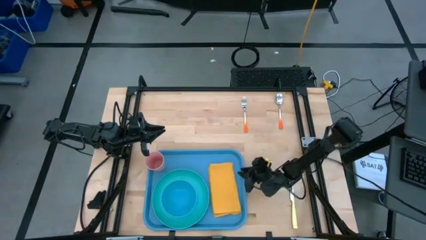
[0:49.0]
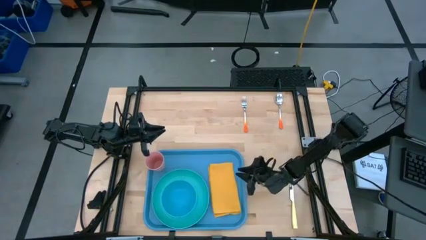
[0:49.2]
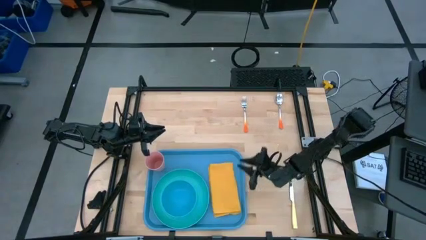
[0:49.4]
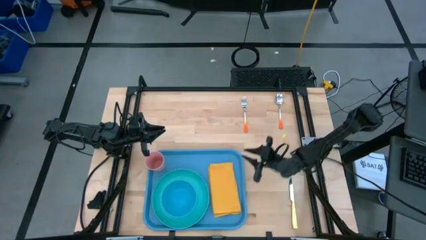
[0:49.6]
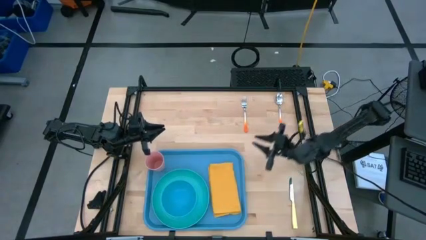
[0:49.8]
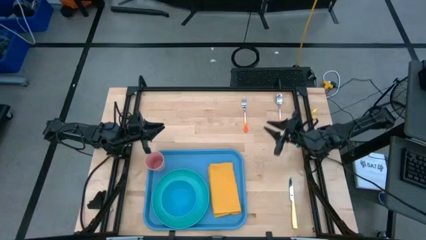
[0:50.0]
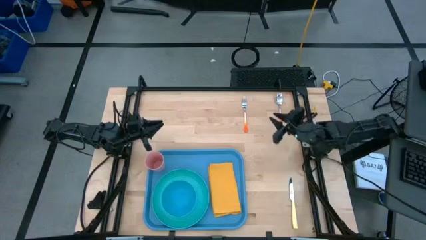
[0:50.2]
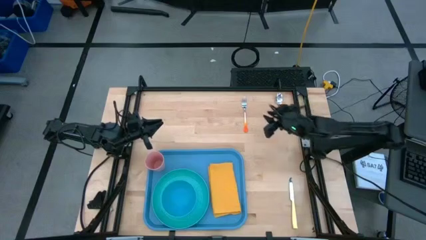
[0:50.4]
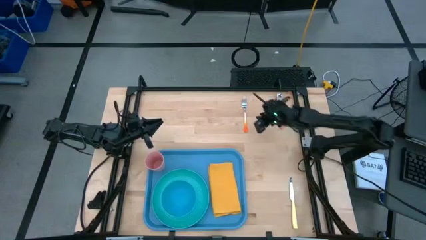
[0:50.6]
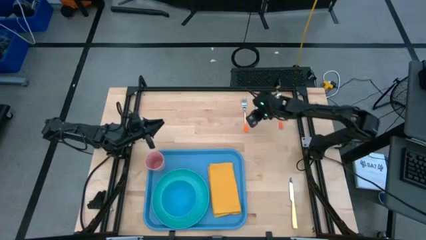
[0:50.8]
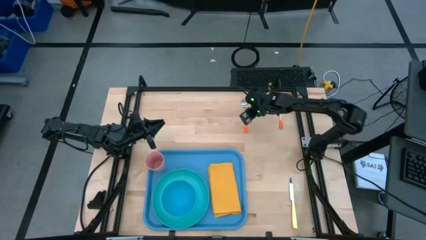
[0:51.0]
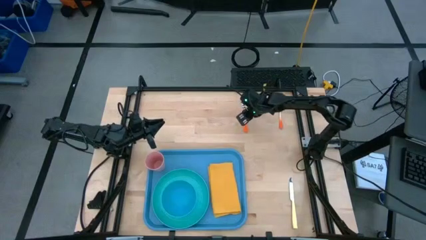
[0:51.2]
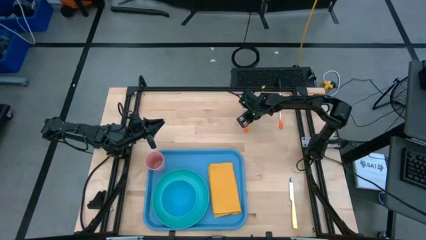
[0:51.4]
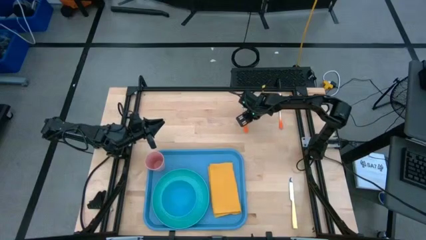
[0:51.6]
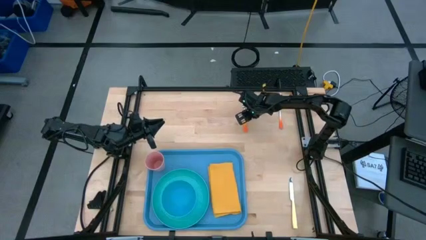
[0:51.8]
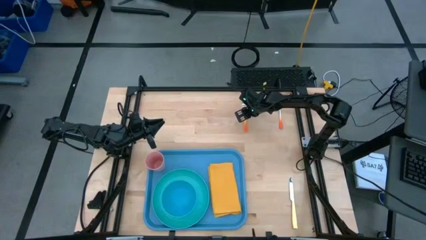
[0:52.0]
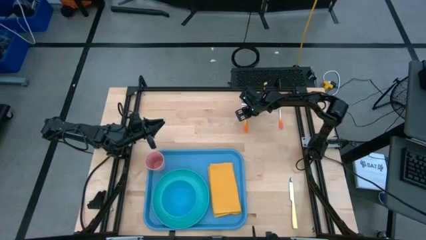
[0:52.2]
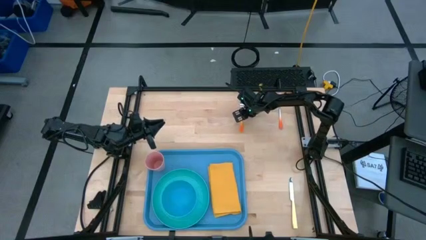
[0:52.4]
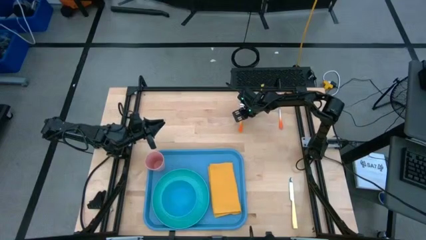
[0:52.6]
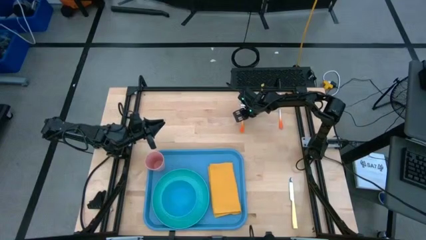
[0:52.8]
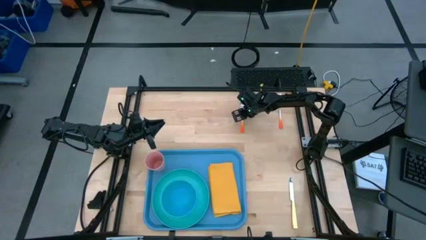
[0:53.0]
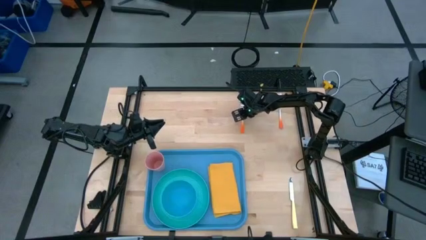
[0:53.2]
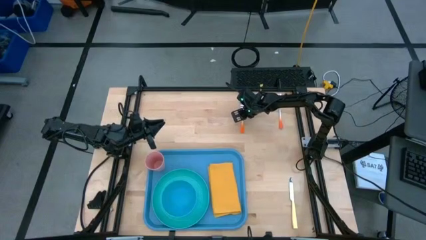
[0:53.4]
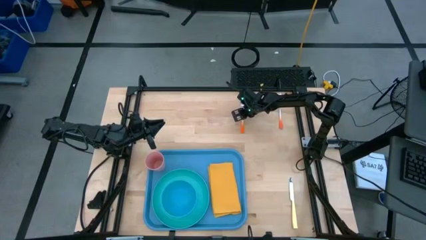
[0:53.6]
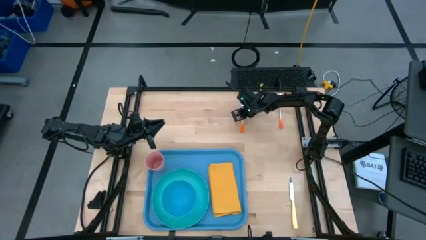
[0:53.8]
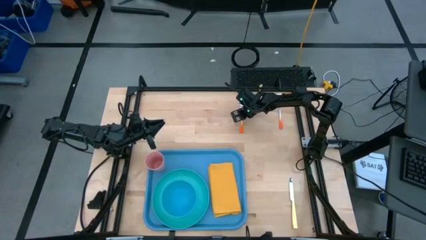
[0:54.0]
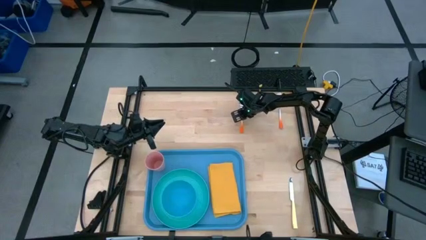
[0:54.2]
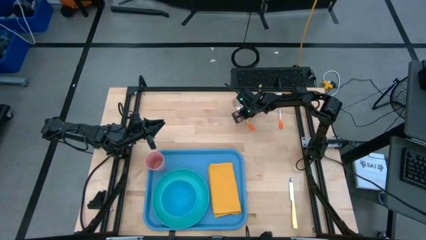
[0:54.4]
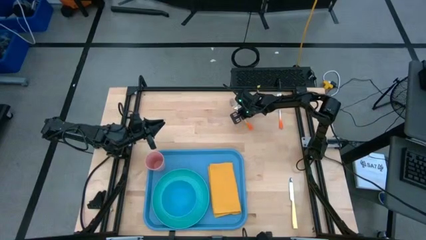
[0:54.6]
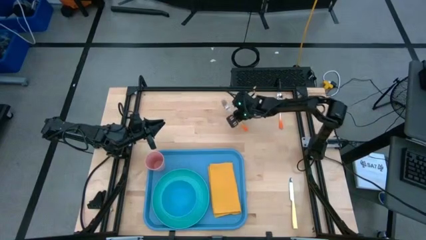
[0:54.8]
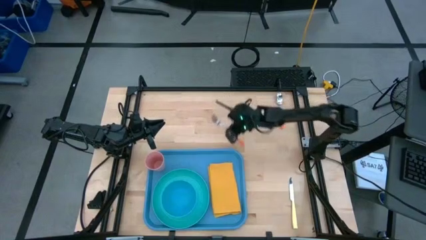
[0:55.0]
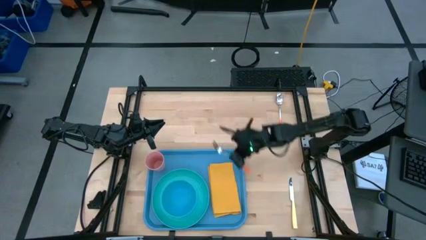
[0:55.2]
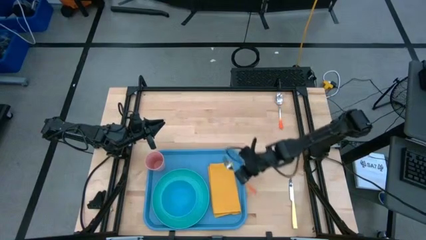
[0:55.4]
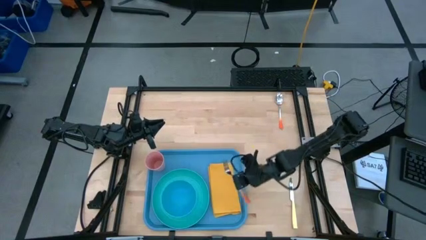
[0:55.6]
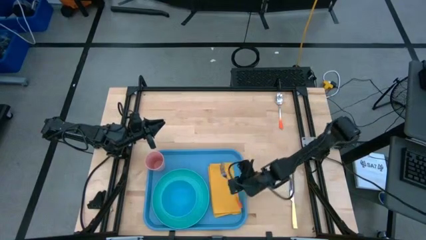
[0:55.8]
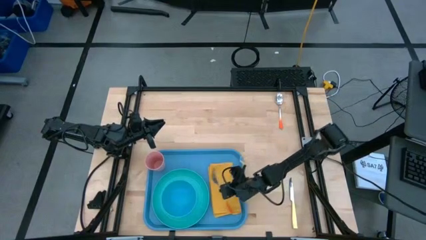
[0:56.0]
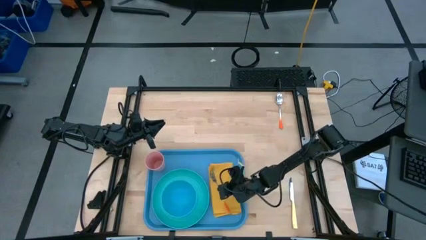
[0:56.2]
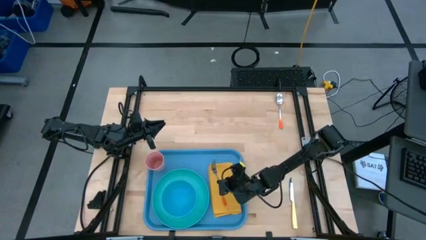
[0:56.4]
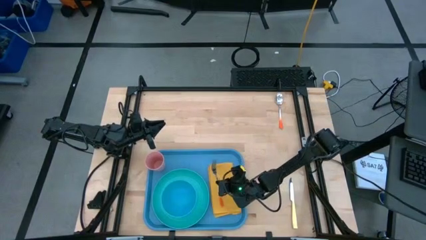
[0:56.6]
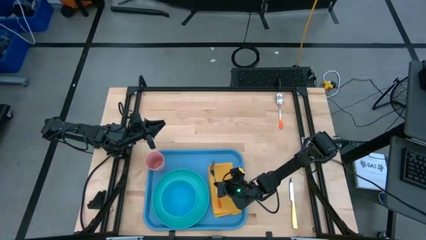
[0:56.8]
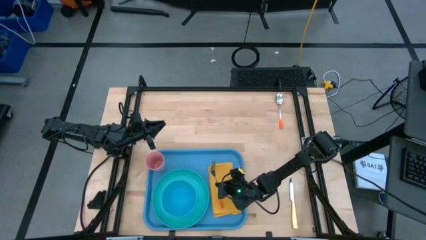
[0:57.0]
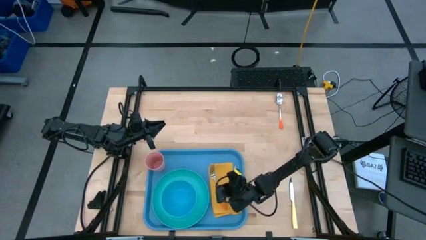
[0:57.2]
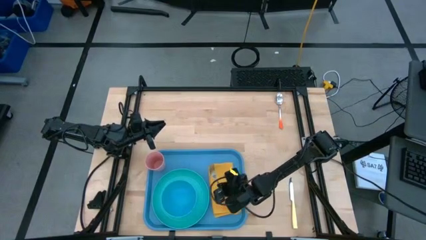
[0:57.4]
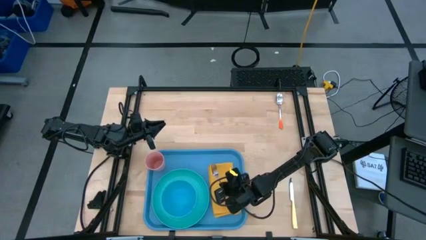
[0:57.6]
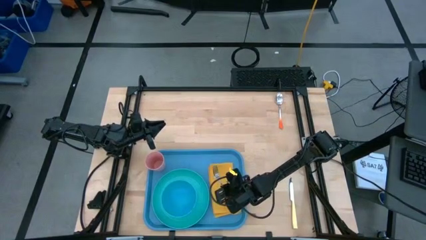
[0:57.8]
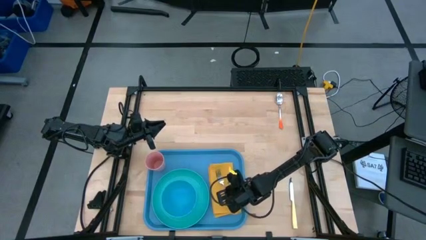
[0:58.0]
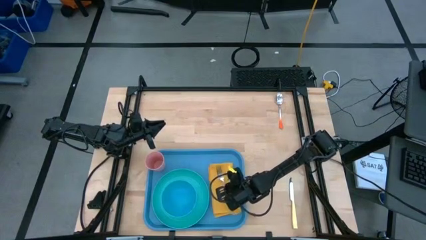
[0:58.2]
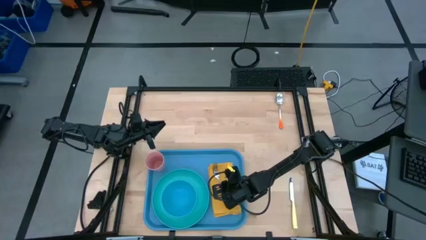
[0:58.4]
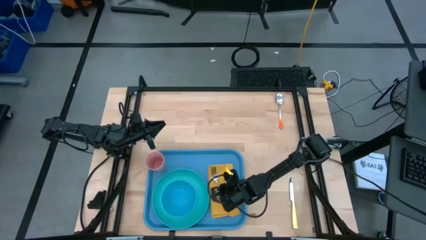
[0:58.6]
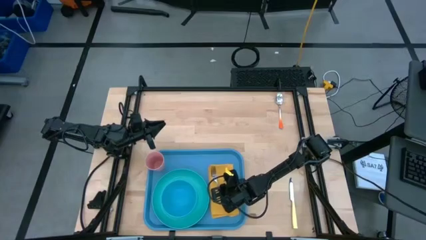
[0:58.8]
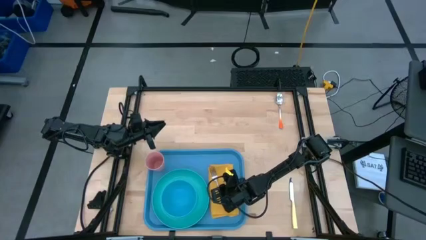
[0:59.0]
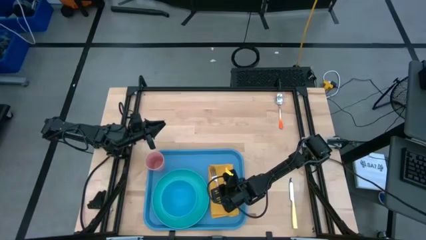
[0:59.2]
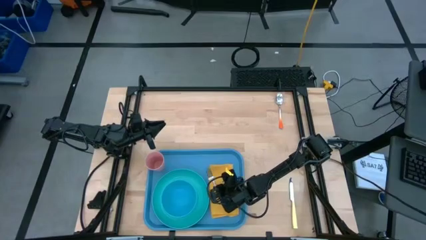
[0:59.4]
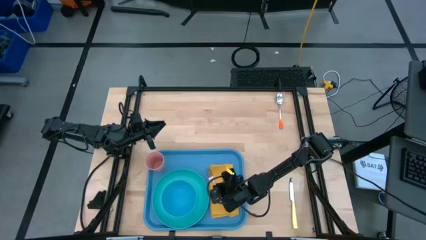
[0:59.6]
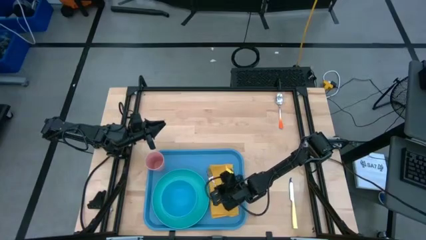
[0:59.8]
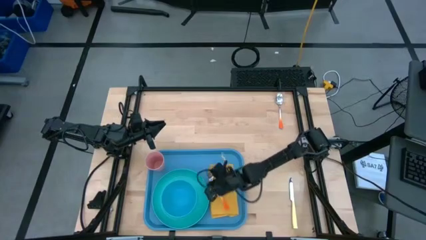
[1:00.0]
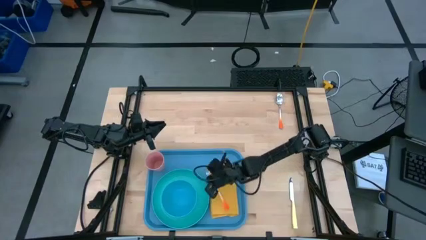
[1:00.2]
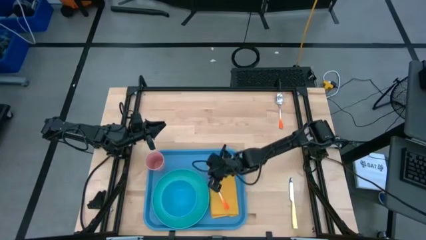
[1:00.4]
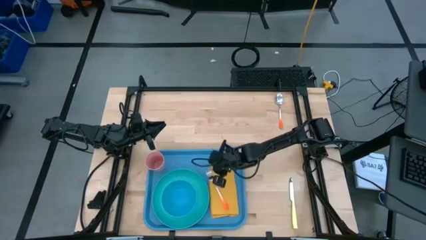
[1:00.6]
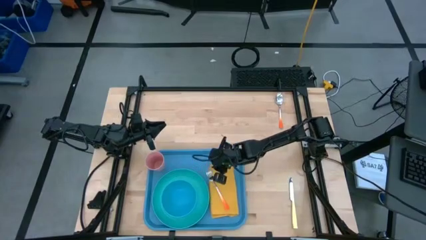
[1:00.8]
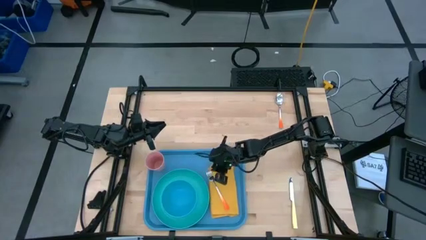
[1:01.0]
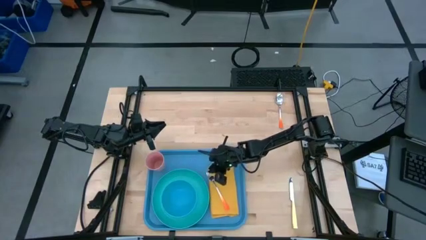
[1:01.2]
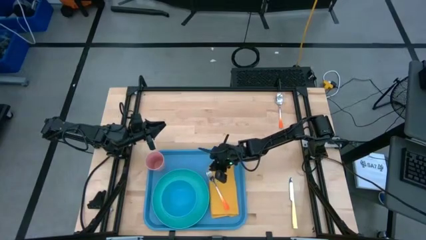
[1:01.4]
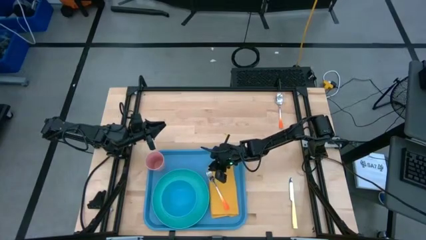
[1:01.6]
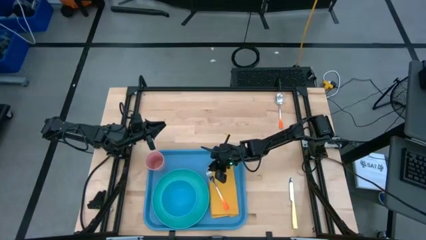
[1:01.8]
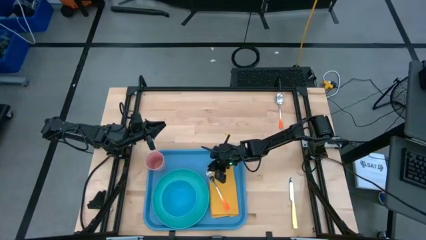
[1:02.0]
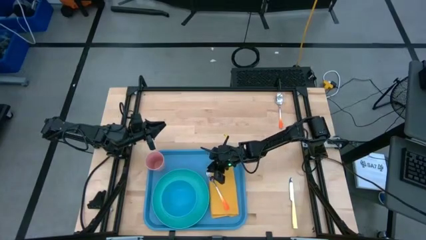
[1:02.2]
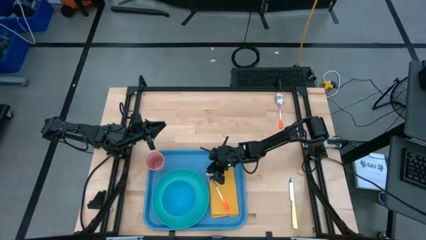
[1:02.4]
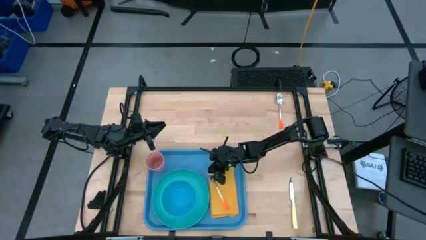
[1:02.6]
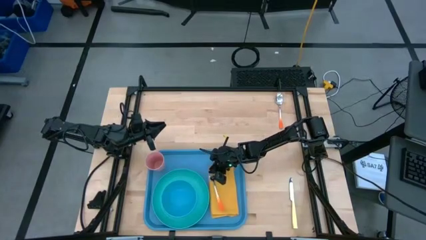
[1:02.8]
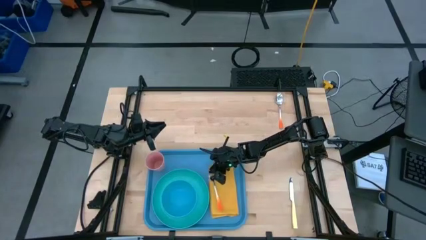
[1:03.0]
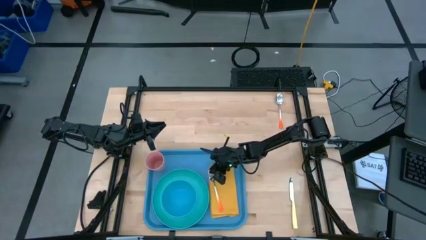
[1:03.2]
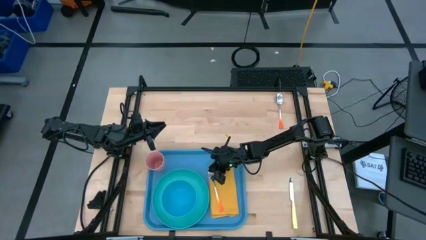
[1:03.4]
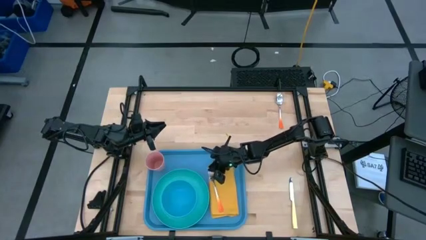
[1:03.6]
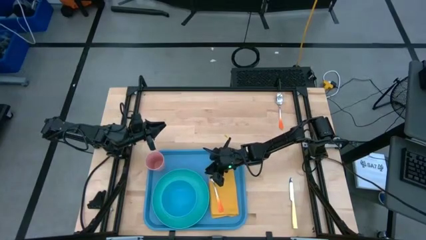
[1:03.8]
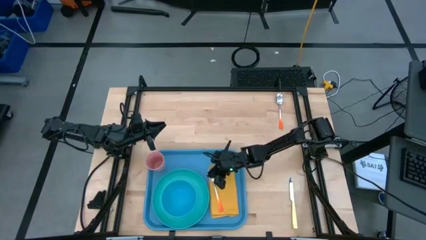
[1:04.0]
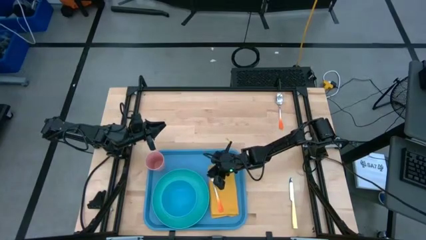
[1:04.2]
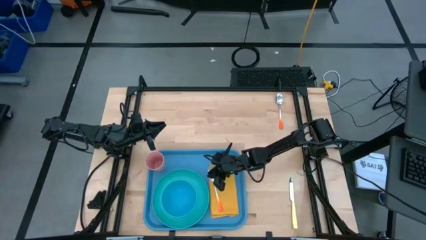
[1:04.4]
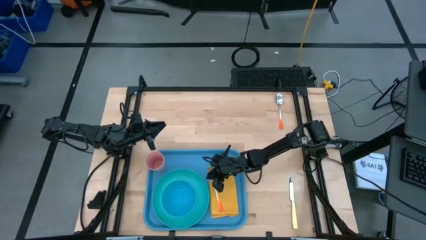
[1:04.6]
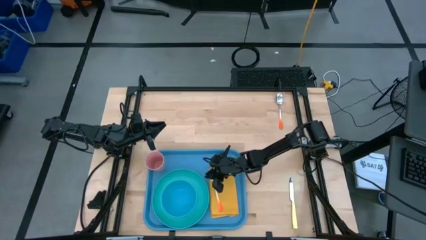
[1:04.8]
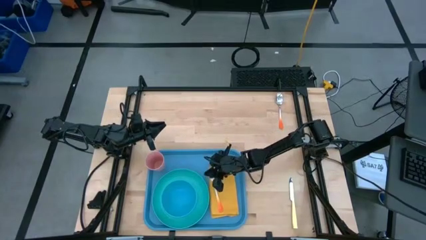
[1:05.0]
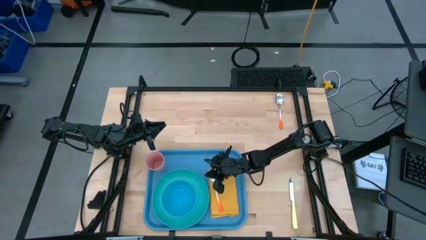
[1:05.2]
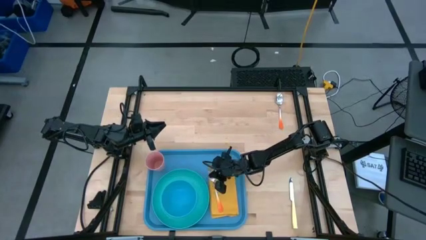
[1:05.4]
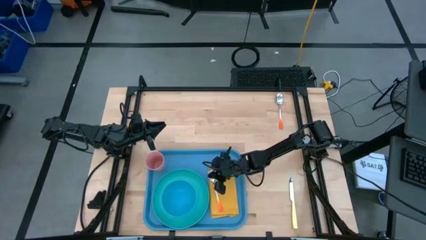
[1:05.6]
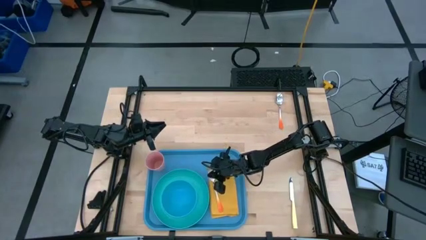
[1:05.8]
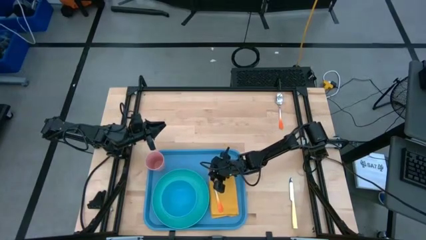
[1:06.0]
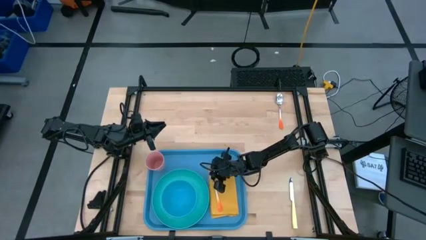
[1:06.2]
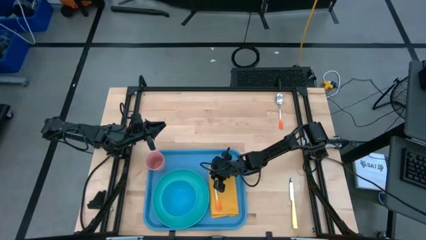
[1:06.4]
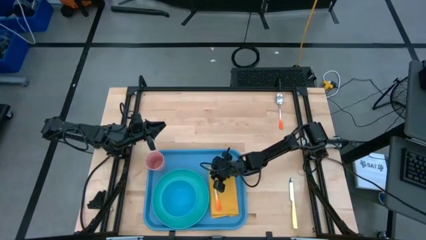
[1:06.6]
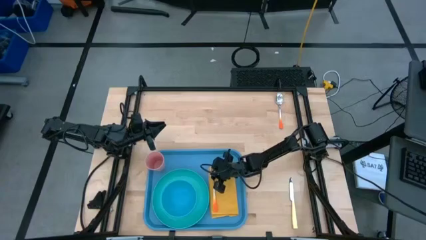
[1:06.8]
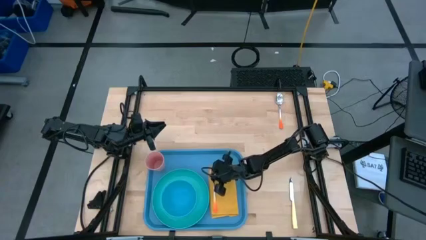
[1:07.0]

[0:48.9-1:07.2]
Task: Set up tray
Put the white orange fork on the yellow napkin
